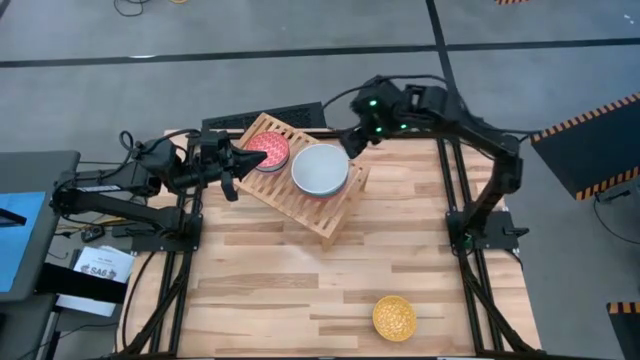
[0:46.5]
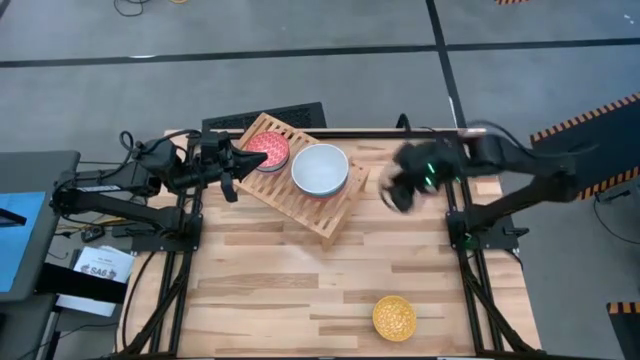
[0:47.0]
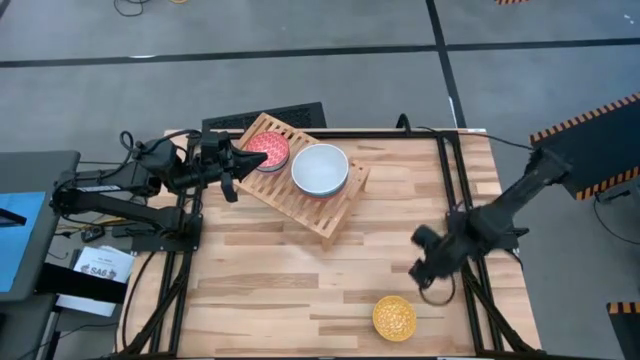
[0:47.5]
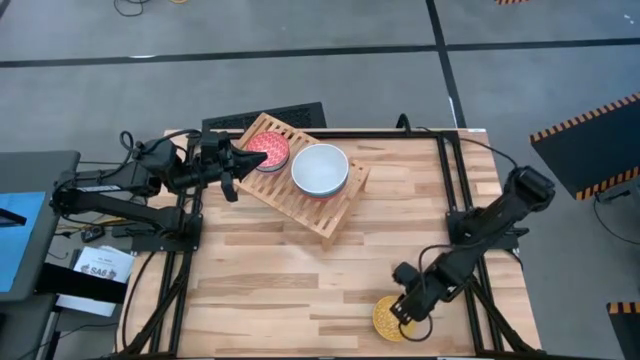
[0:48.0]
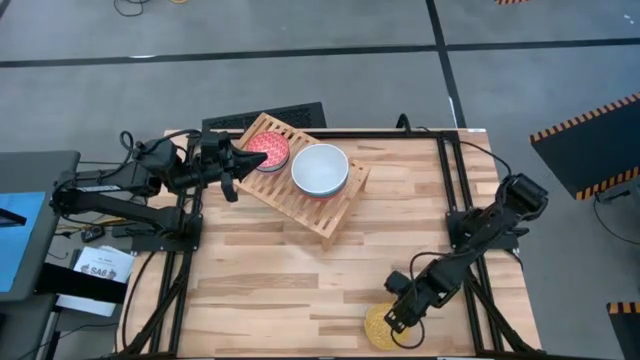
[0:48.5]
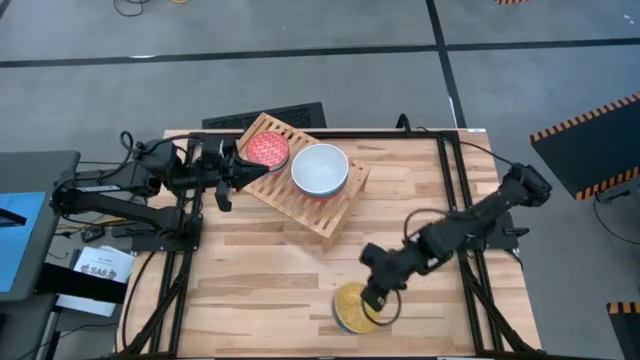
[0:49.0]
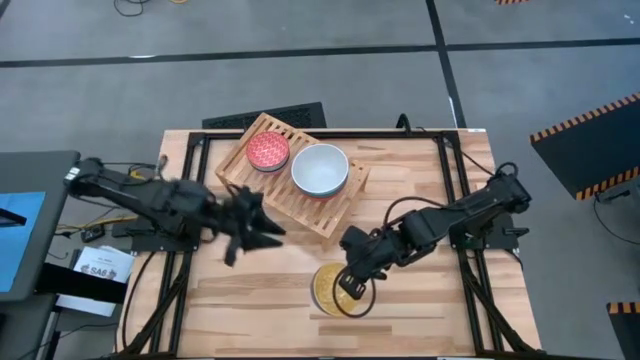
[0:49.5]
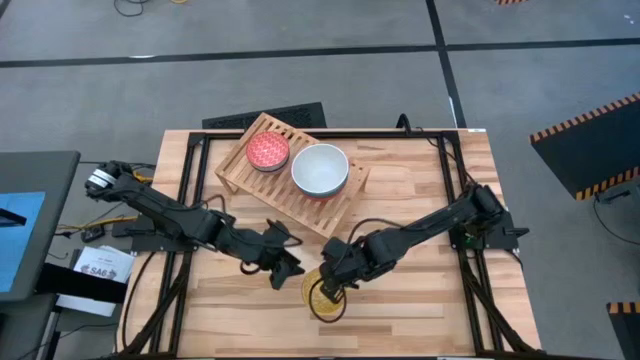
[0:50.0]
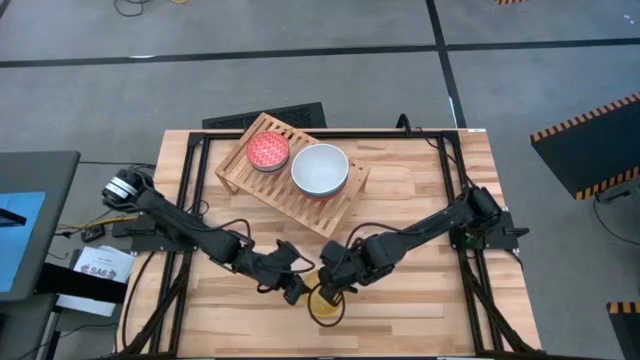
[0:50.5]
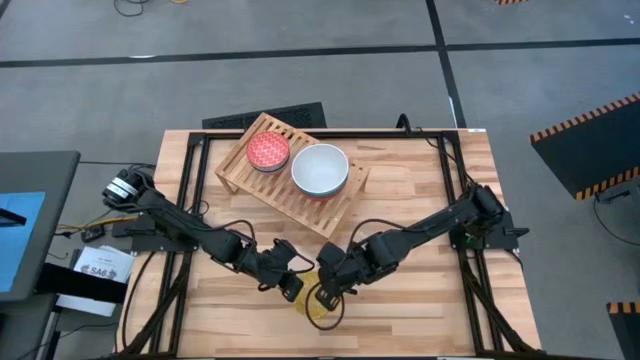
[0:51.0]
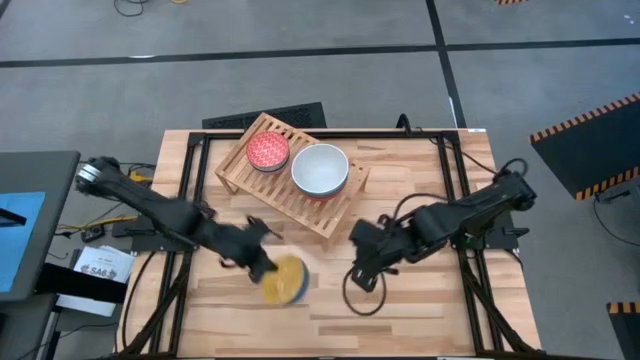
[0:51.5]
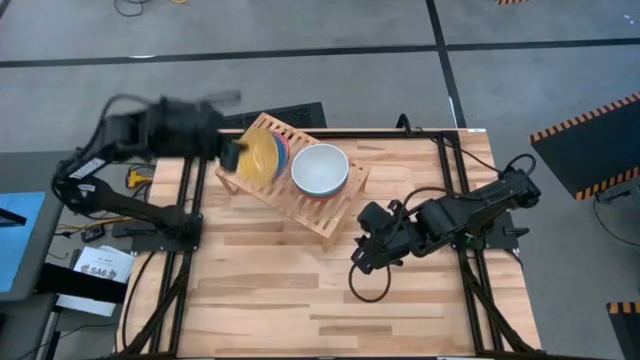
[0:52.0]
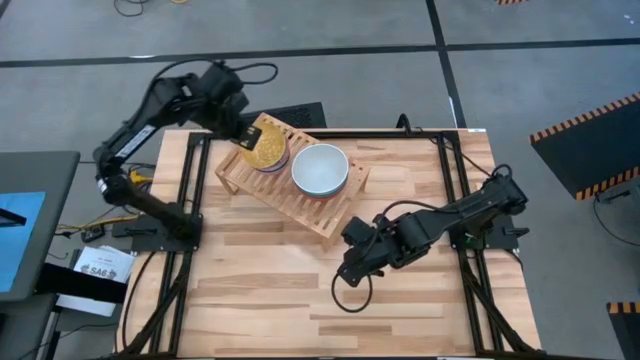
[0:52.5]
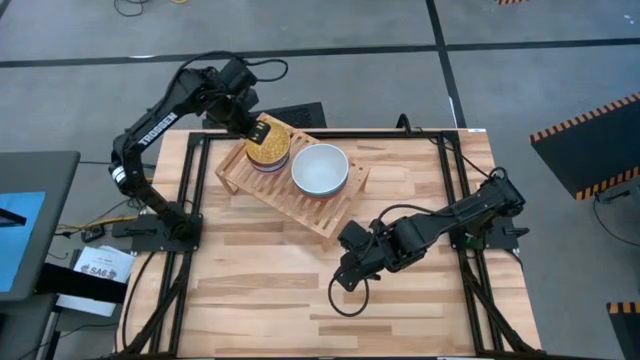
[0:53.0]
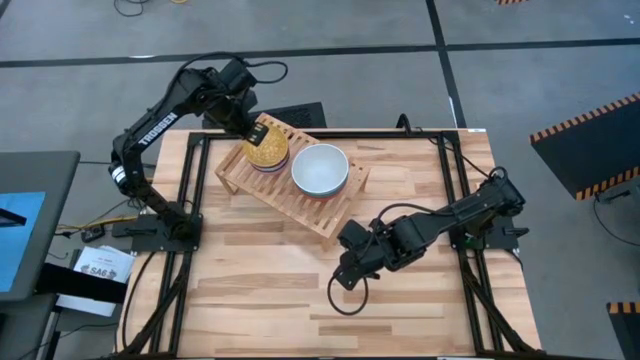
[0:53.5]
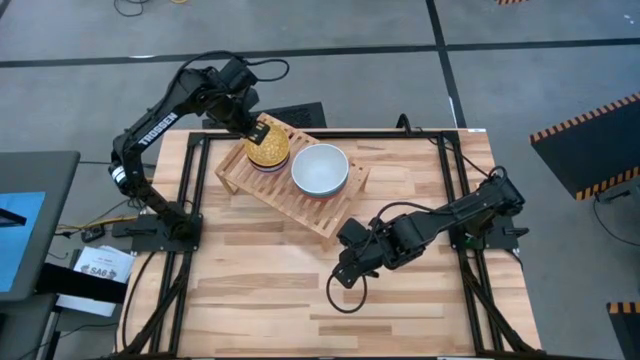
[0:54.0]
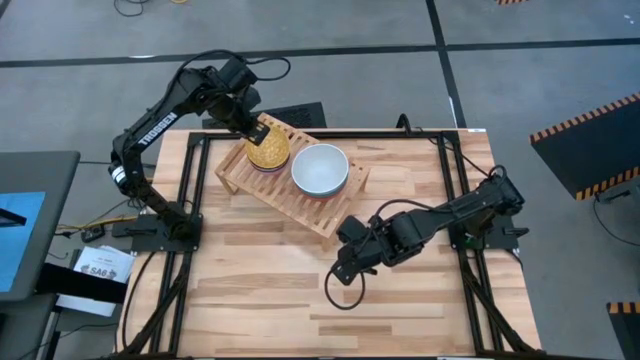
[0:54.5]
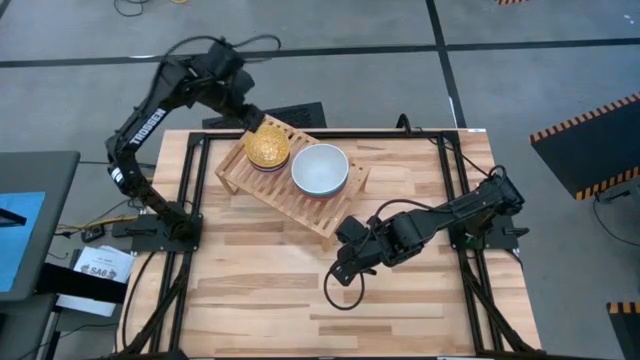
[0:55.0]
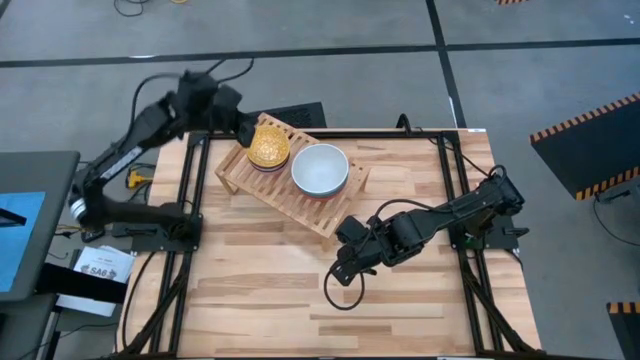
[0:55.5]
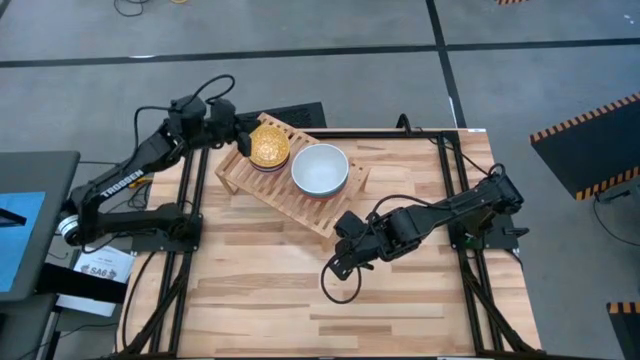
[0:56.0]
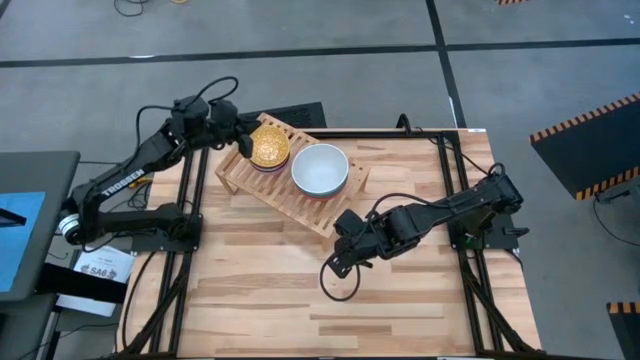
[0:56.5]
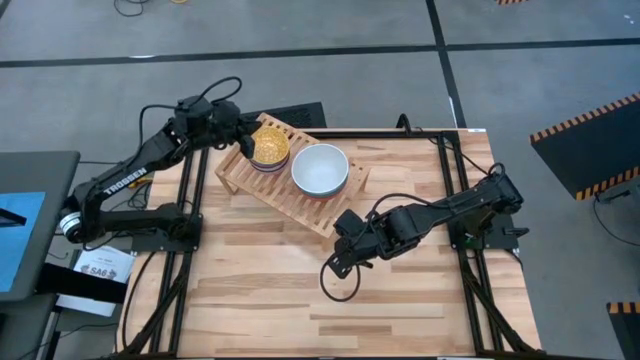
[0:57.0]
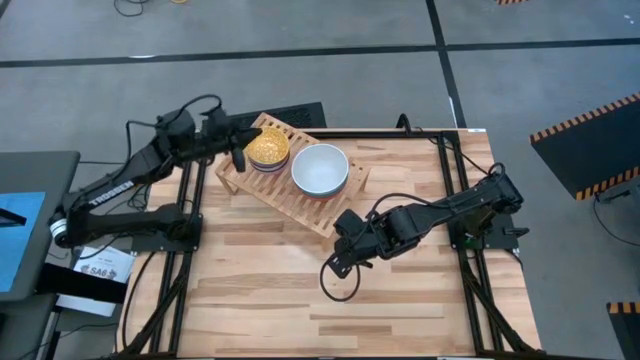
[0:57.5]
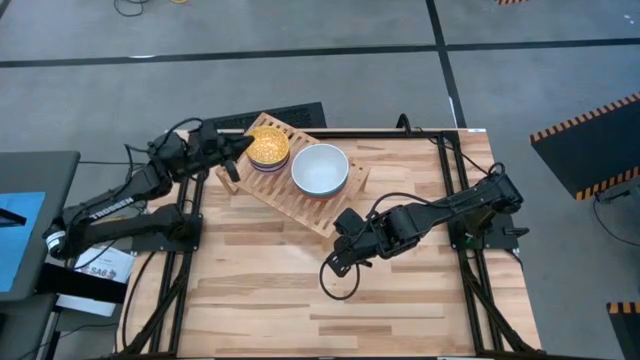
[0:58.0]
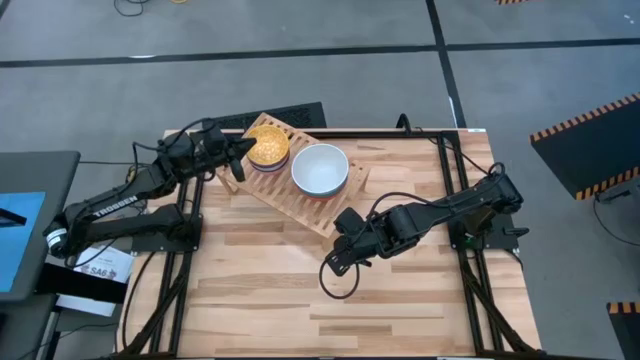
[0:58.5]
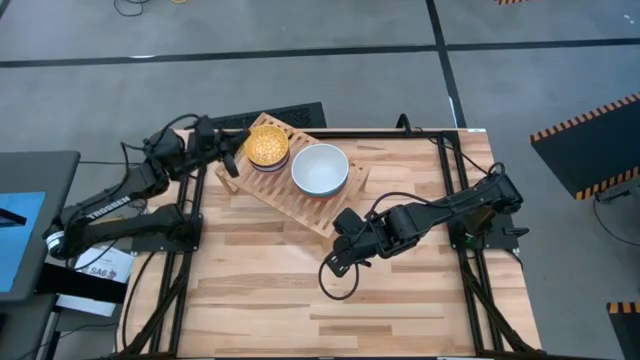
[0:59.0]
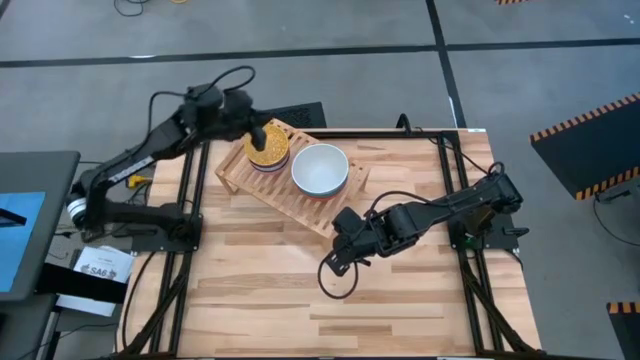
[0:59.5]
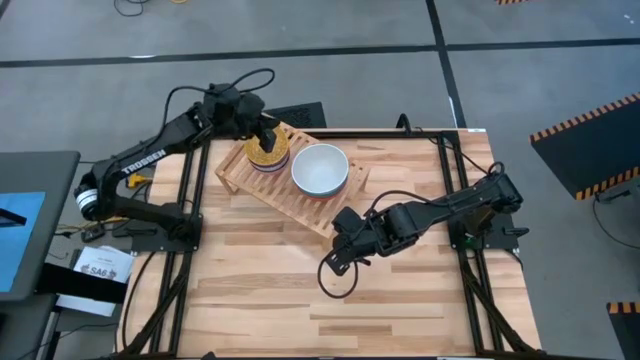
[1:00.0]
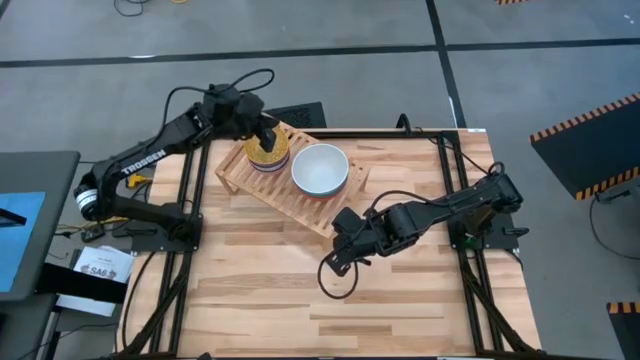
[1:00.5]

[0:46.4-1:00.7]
Task: Place and stack bowls onto a shelf
Stack the yellow bowl on the top of red bowl on the shelf

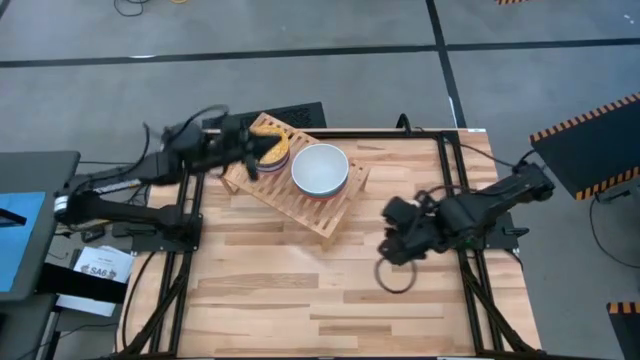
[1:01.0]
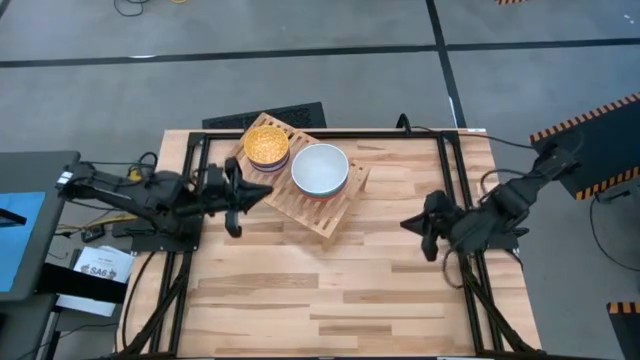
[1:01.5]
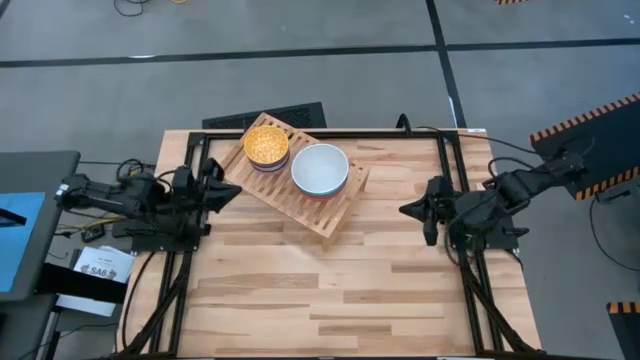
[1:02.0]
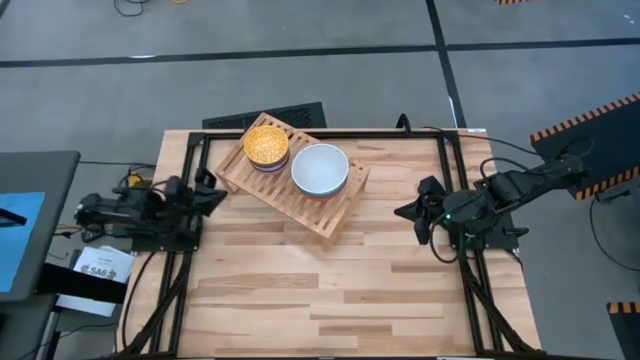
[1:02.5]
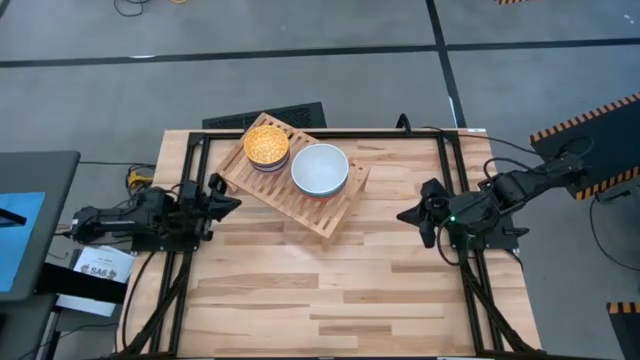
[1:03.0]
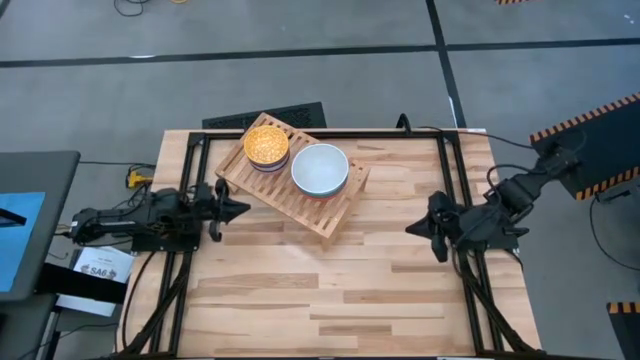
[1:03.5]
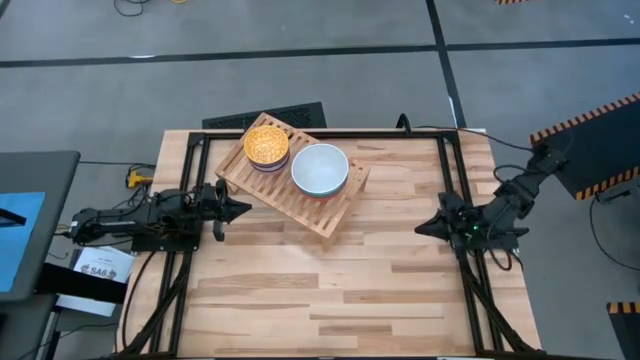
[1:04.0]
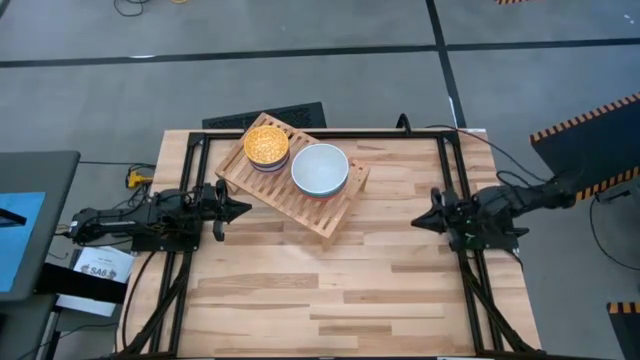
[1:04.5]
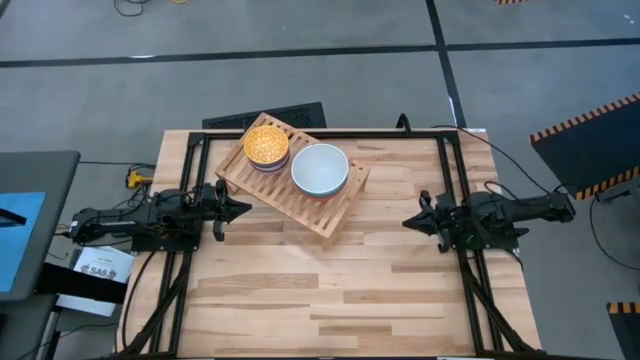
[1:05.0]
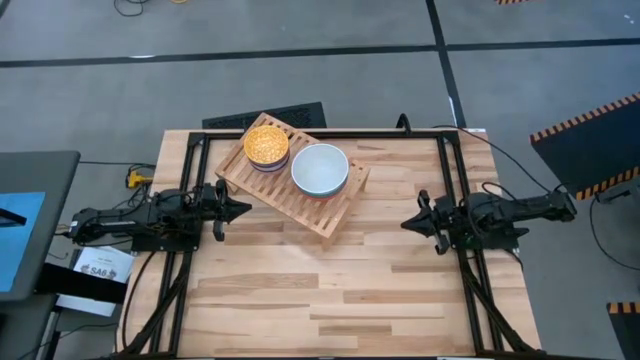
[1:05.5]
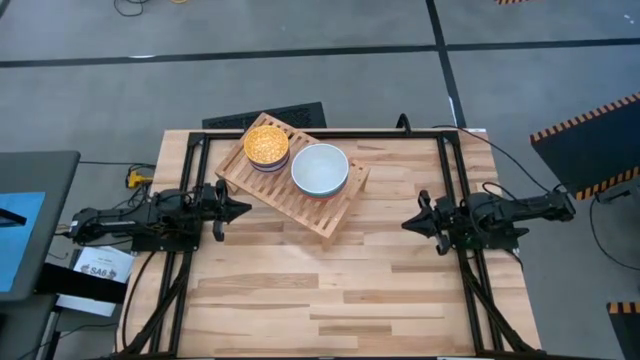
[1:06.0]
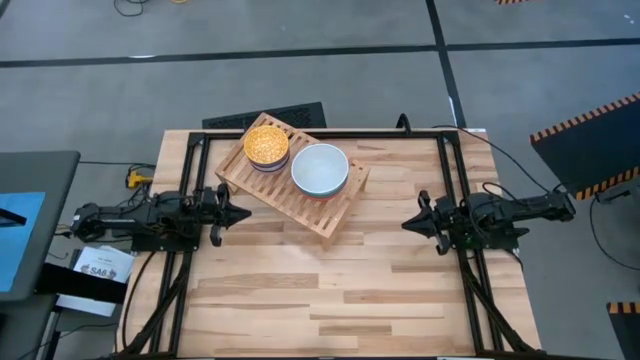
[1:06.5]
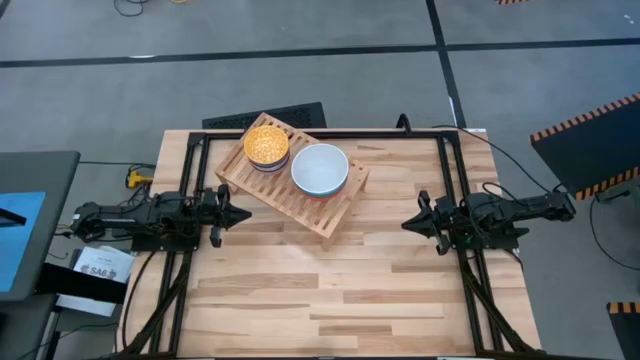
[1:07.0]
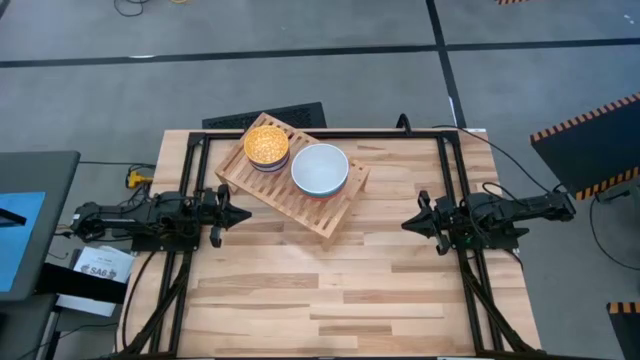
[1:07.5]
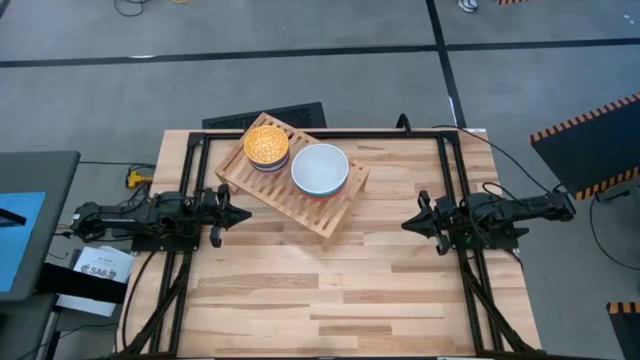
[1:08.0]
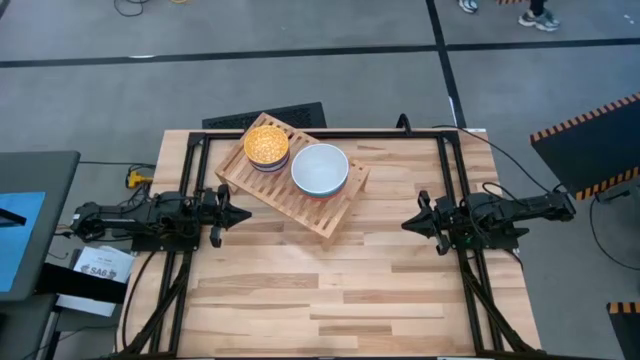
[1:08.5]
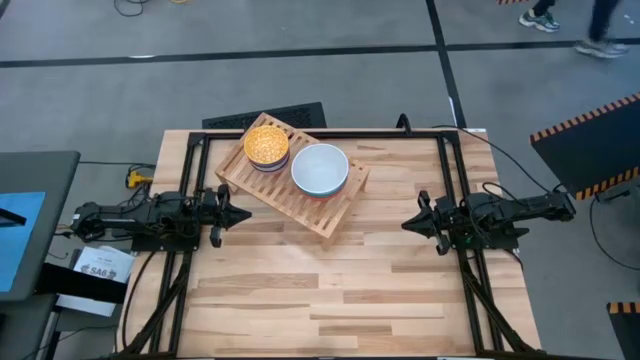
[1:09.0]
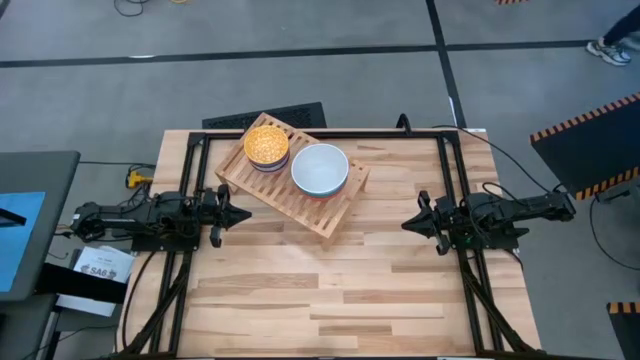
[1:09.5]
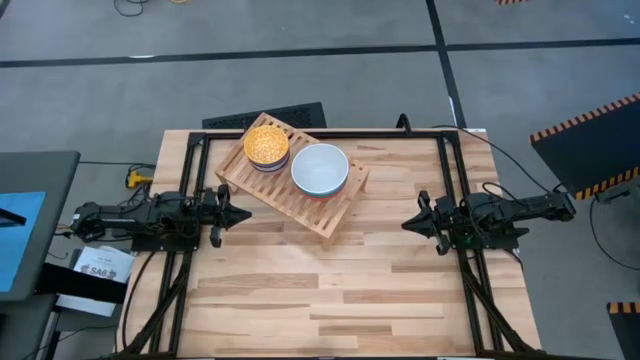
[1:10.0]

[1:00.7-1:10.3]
Return to Home Position
